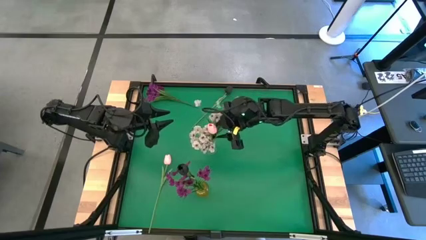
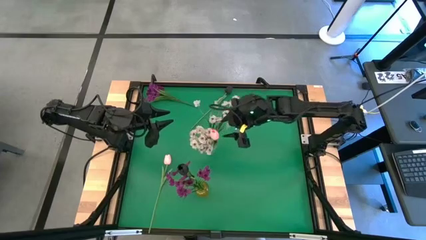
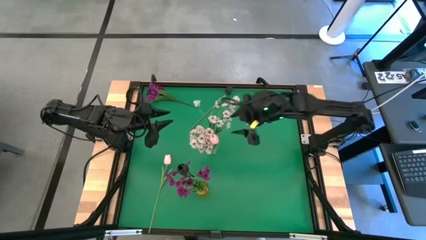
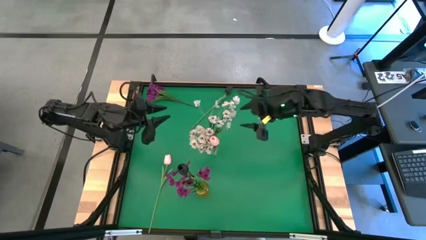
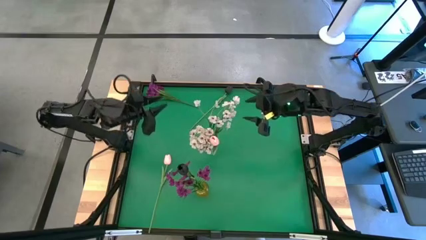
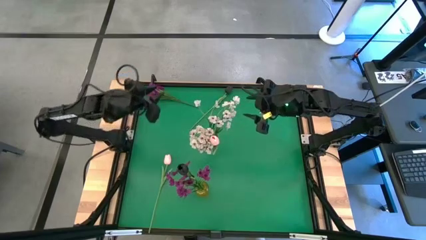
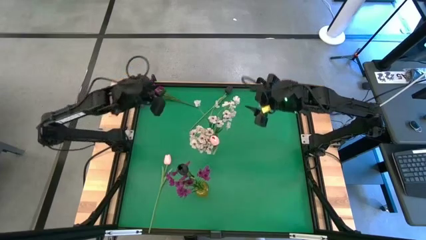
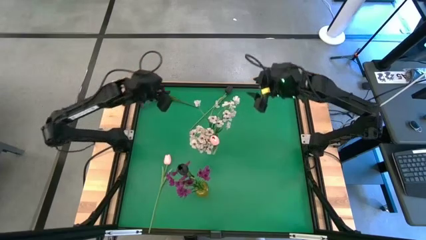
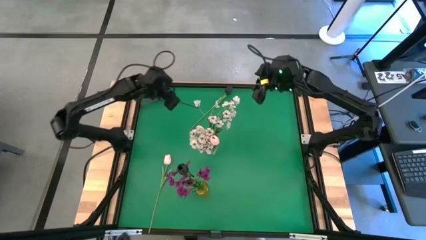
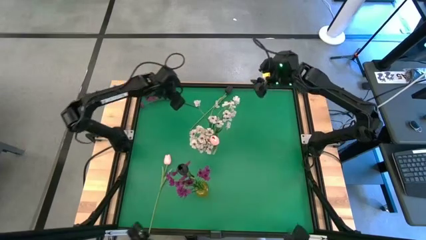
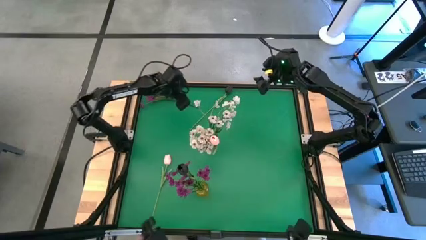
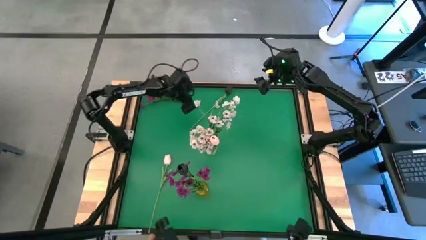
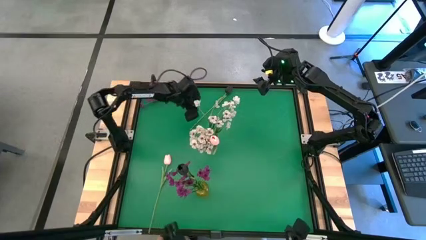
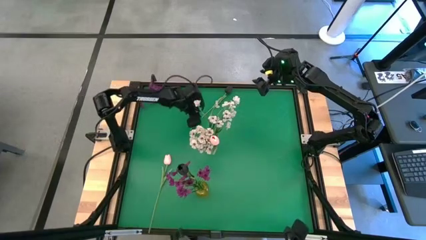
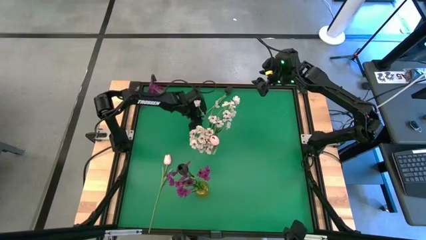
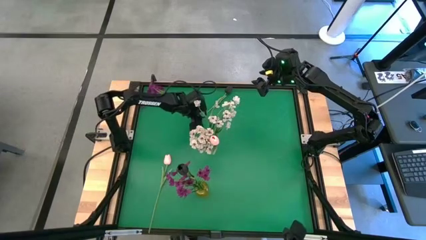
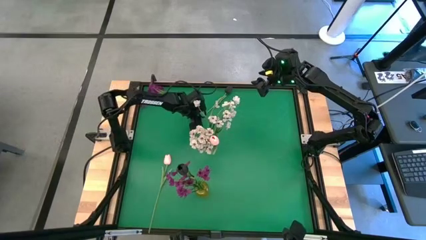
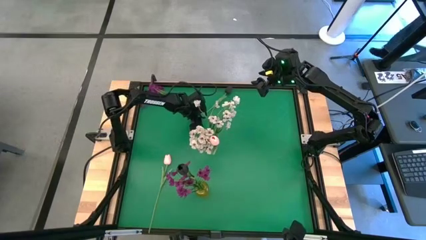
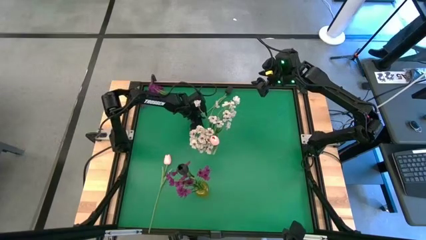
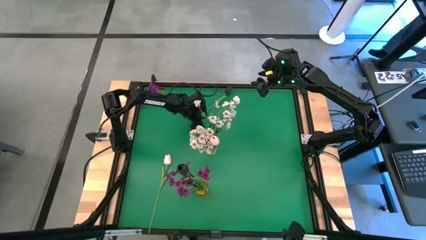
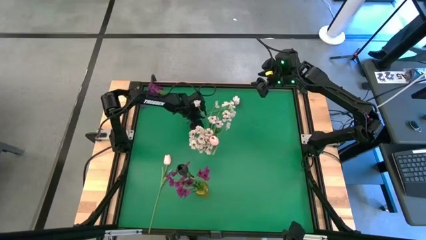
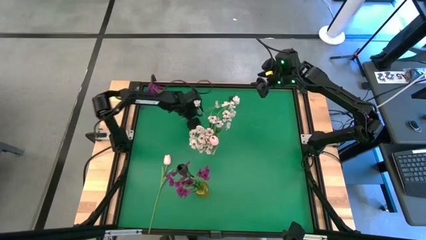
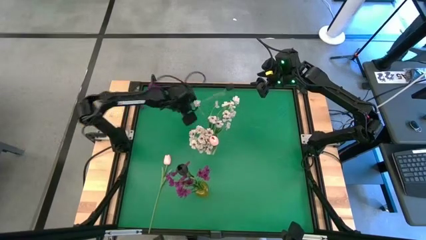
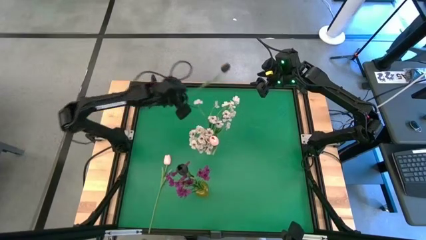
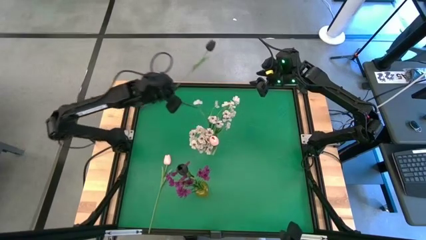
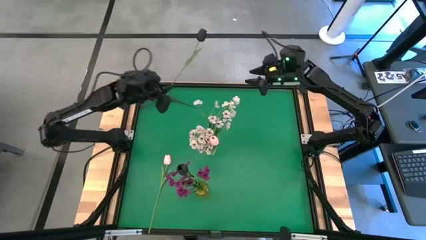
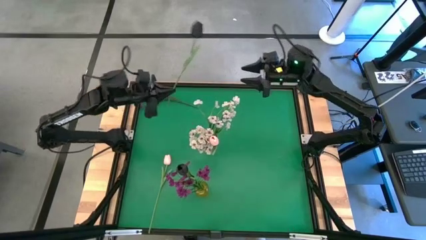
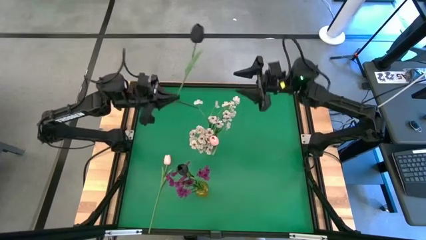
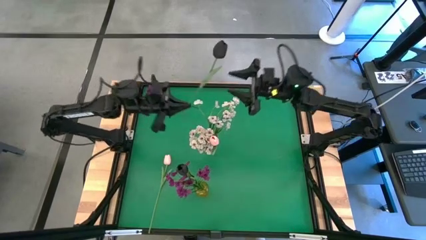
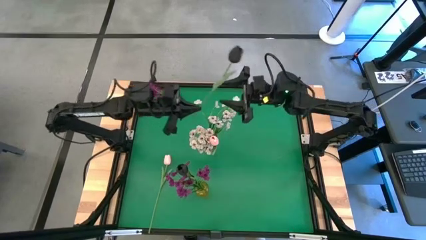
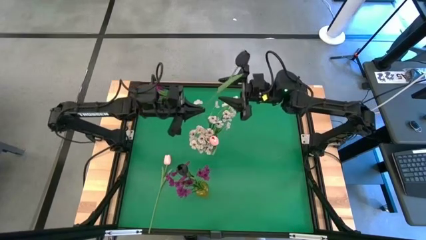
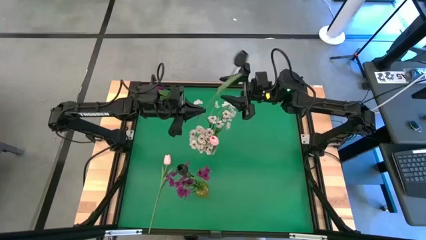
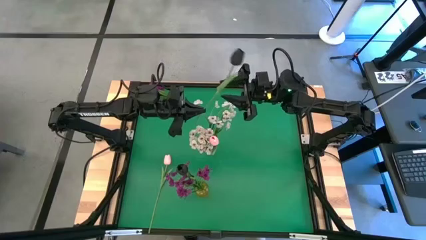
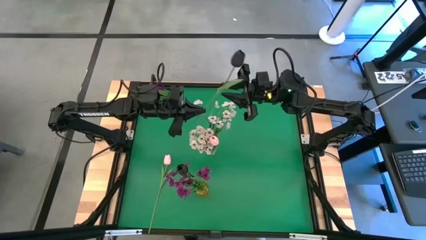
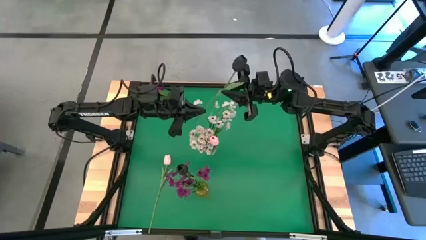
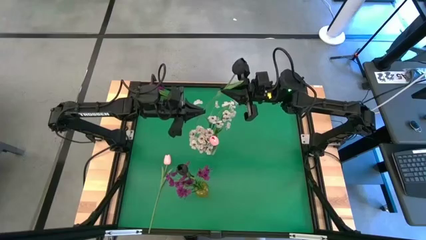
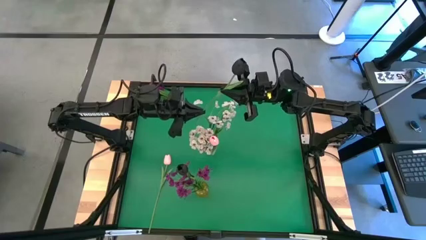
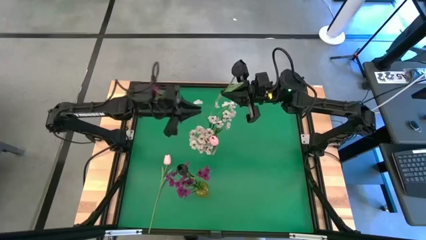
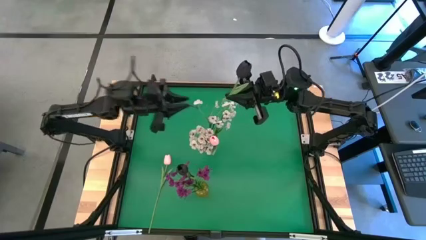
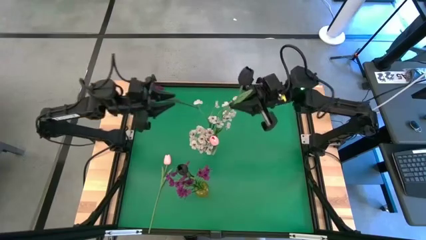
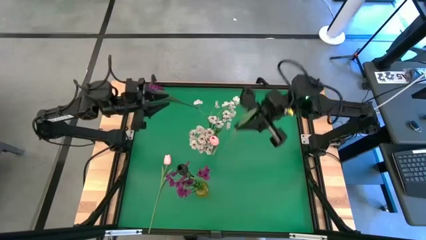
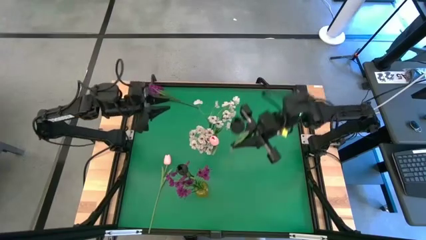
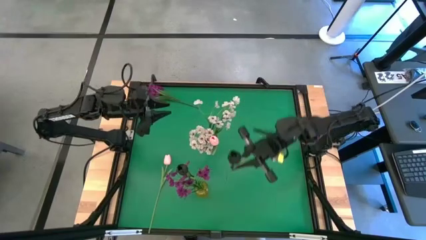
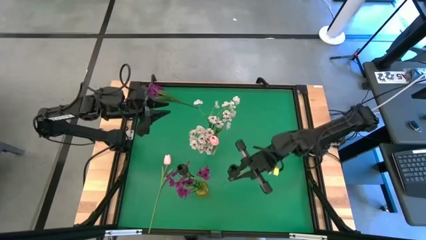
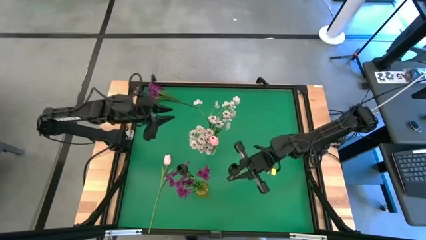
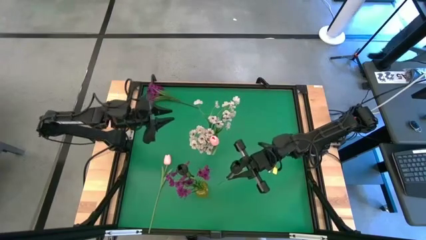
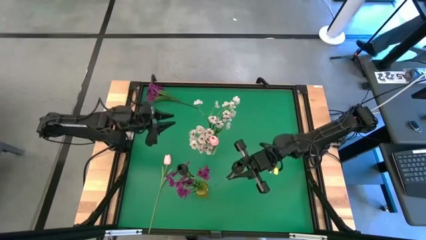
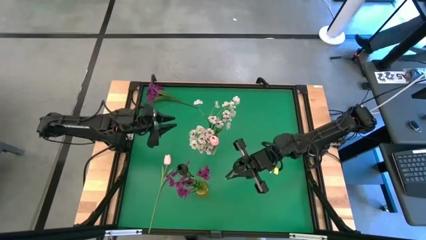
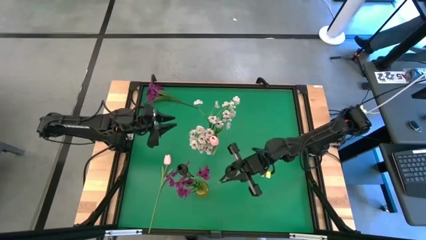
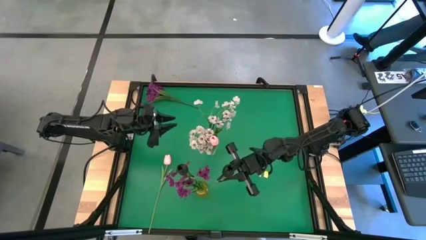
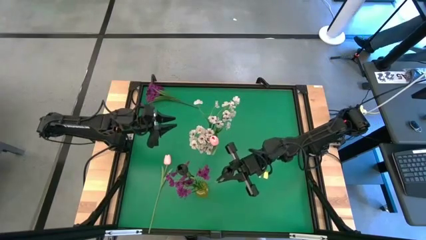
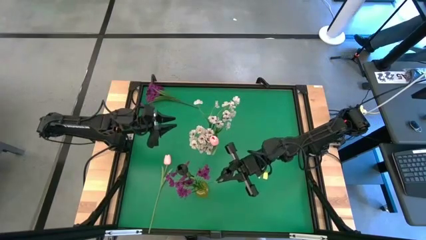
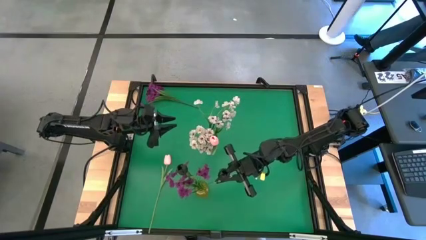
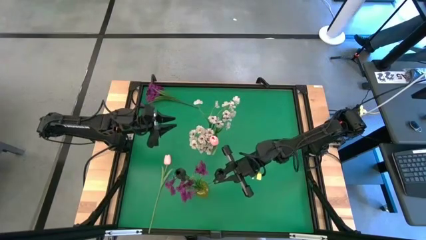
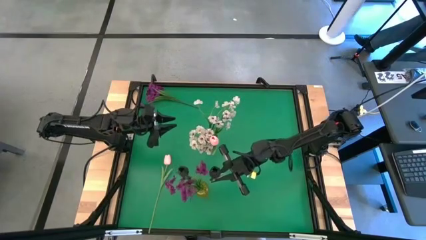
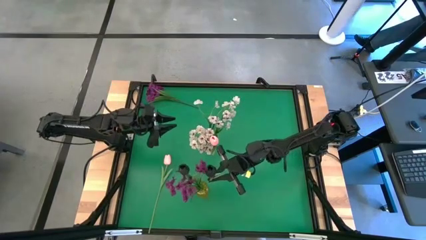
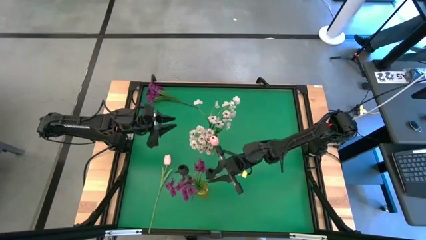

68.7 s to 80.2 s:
Task: Sort flowers into vase by color
Put the black flower into the yellow vase

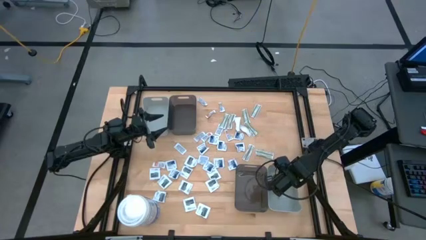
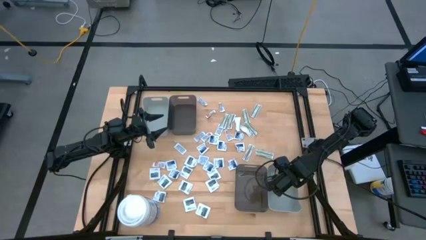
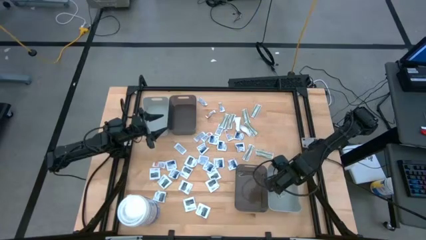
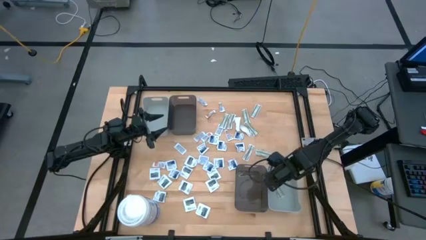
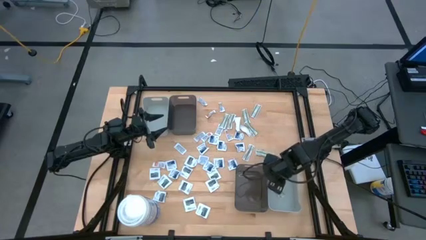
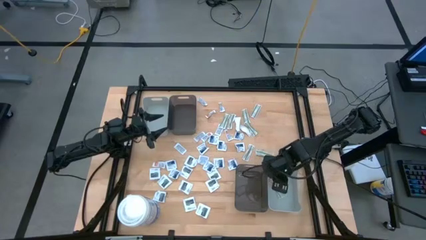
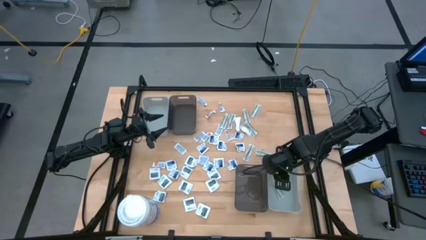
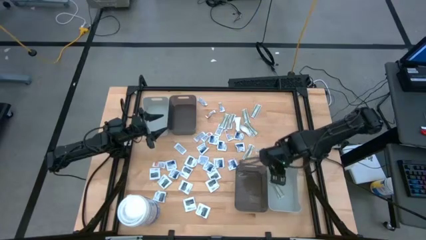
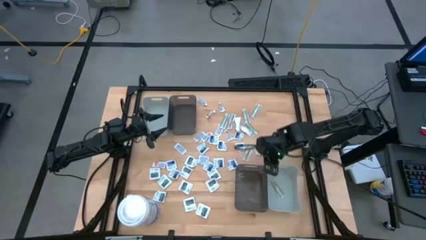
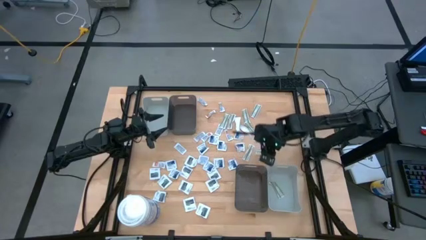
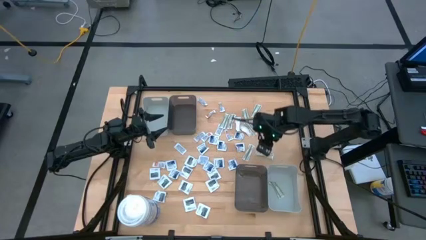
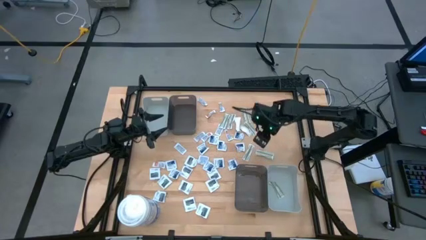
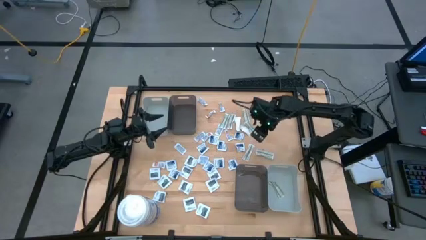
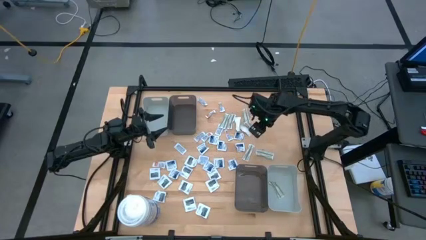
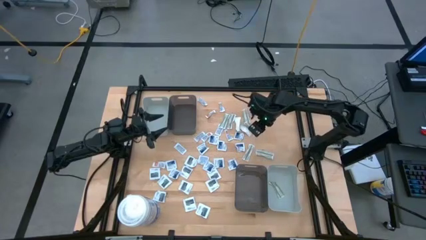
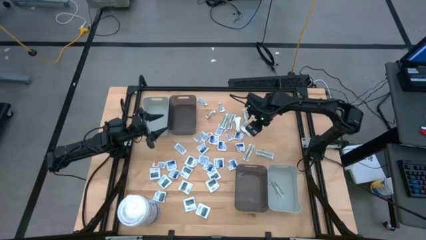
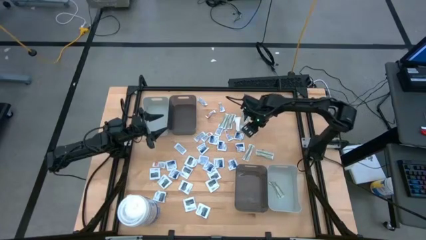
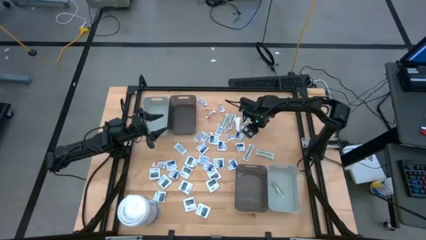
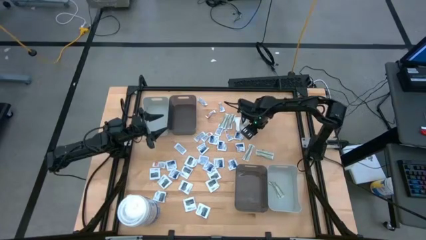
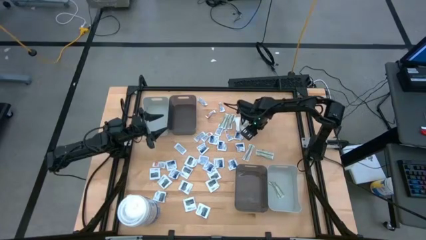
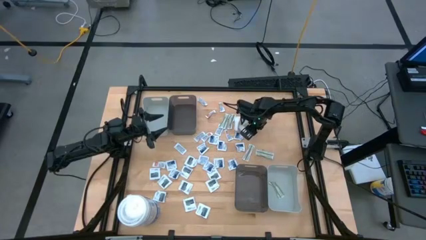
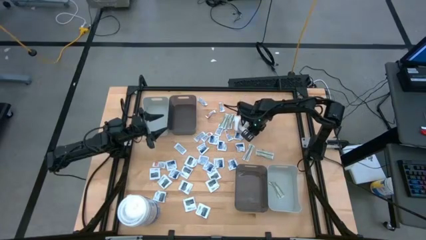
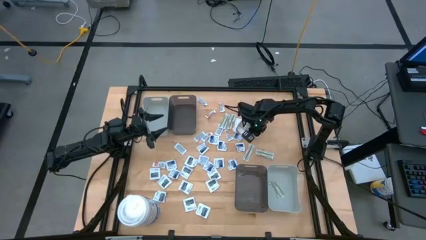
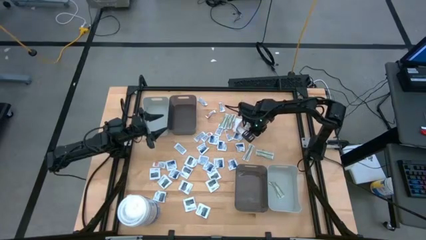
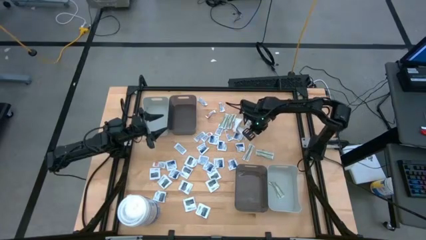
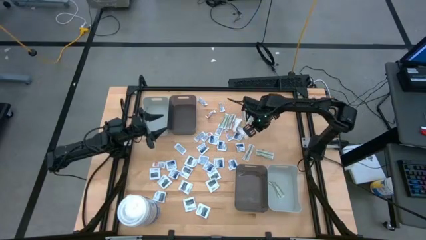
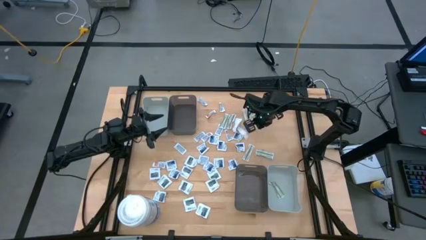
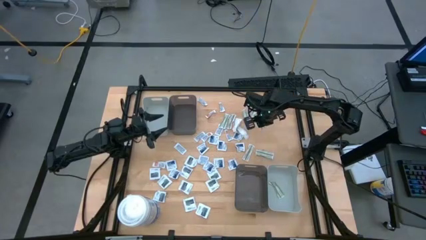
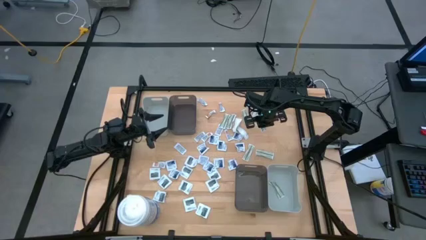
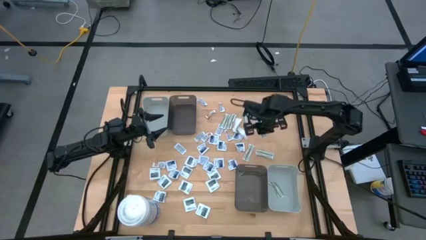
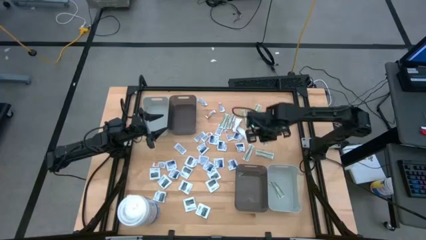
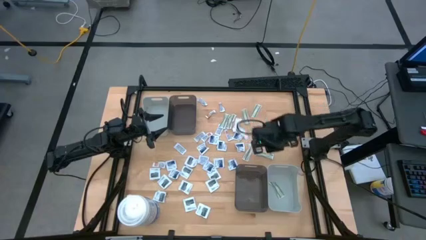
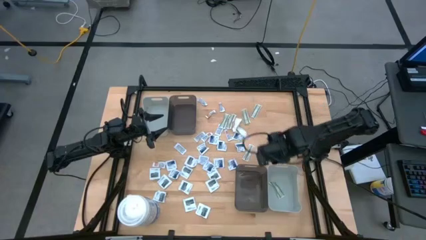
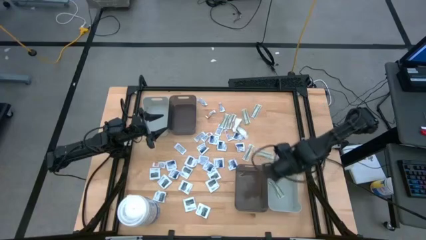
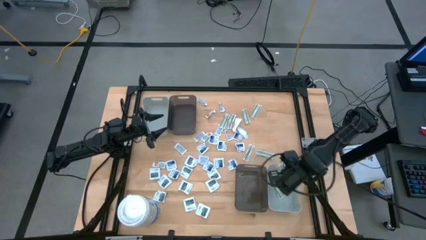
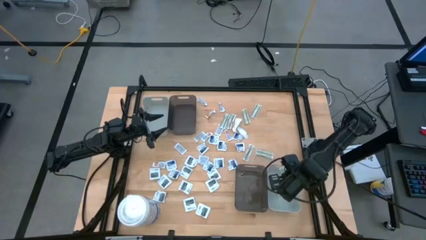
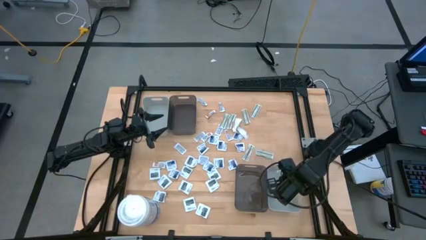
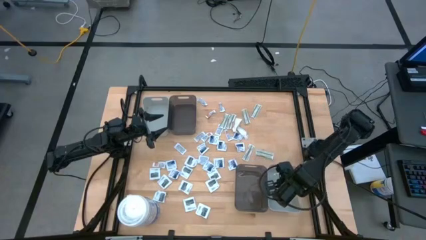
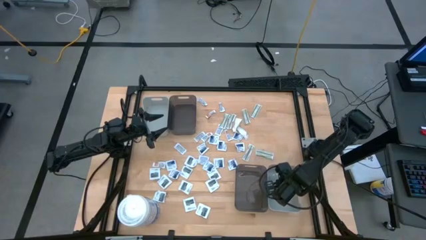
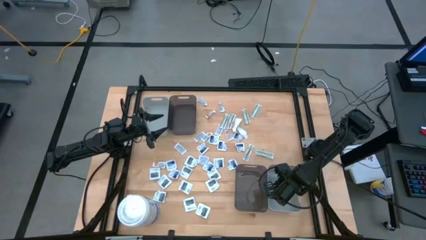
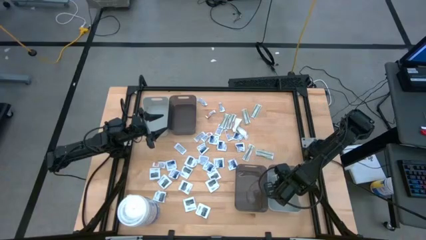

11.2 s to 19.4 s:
Task: Pick & Place First Aid Supplies
Put the white bandage pack into the bottom gray bin
